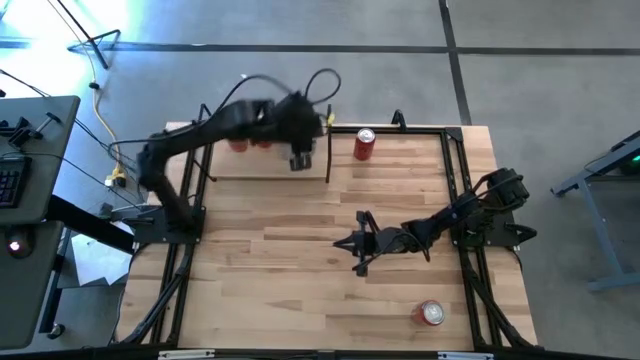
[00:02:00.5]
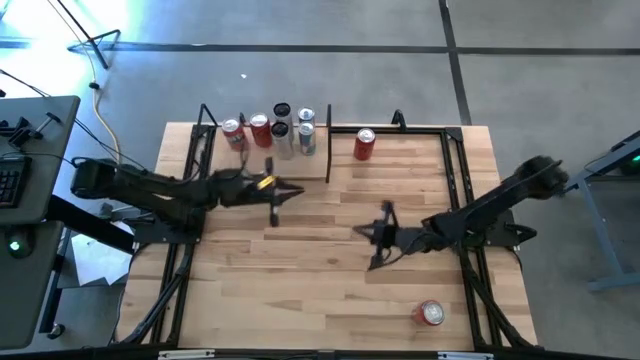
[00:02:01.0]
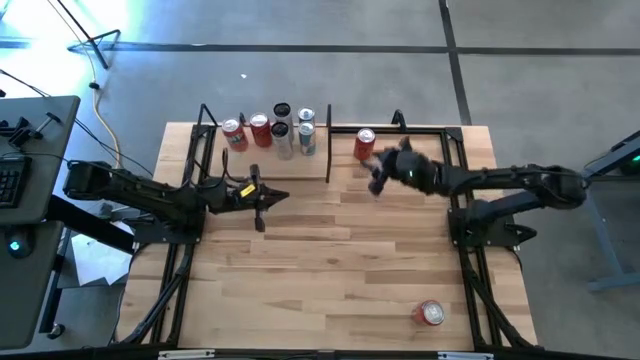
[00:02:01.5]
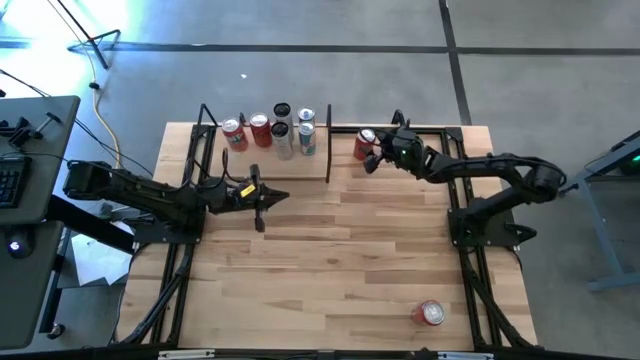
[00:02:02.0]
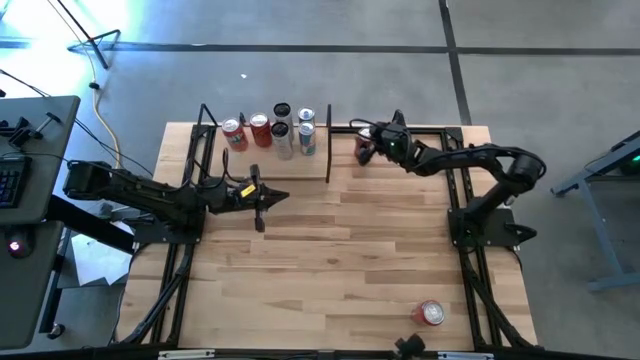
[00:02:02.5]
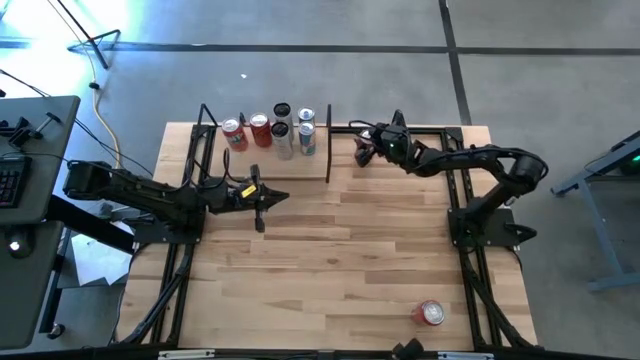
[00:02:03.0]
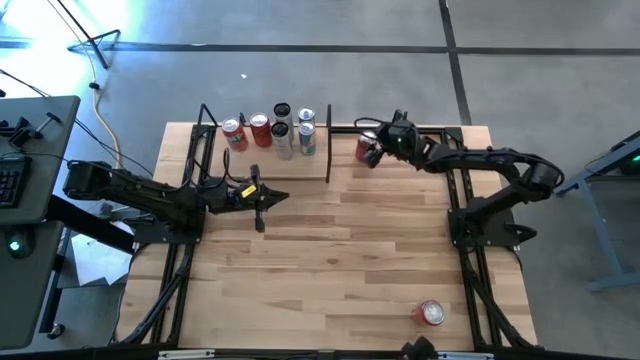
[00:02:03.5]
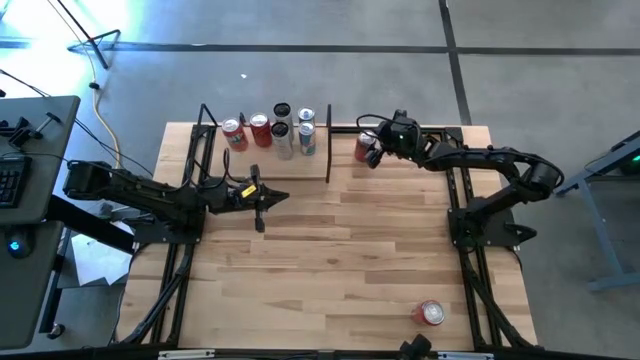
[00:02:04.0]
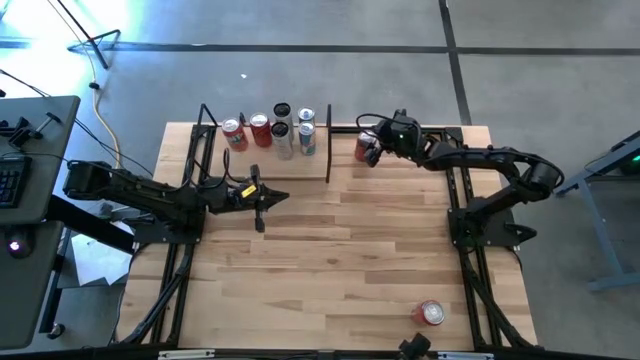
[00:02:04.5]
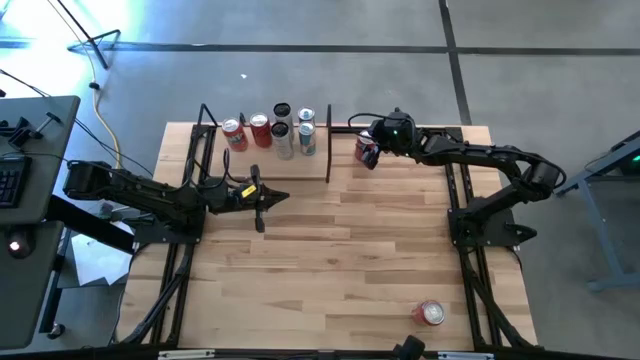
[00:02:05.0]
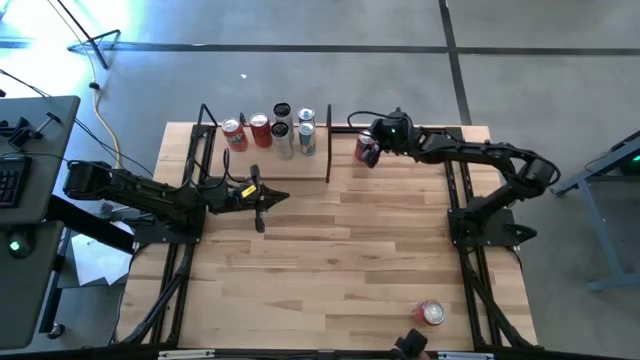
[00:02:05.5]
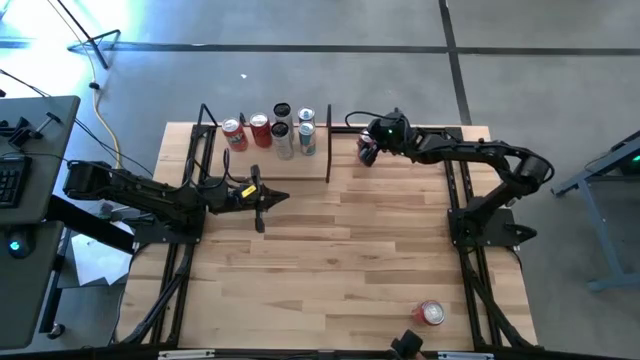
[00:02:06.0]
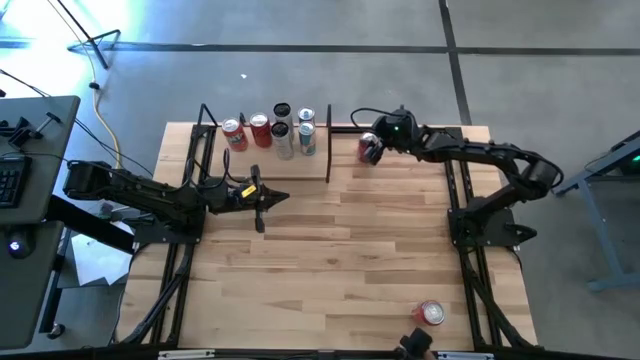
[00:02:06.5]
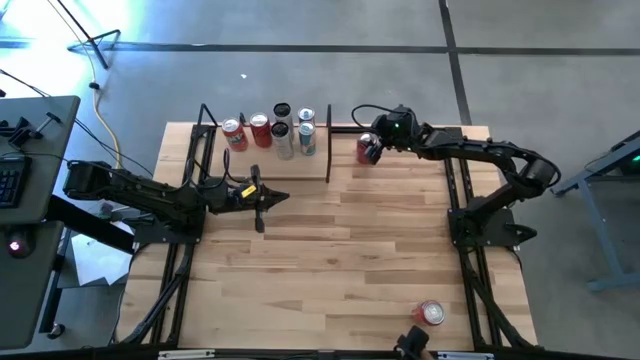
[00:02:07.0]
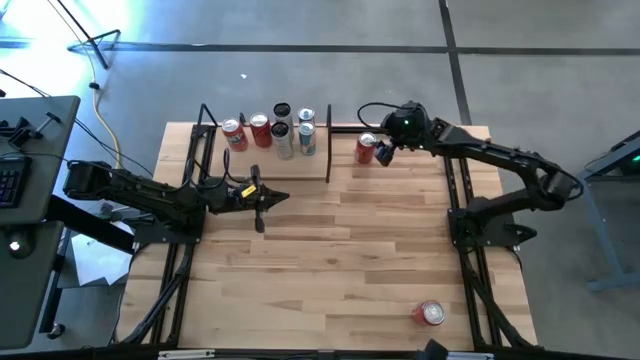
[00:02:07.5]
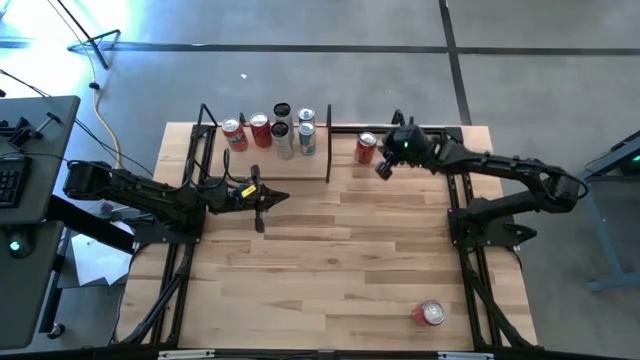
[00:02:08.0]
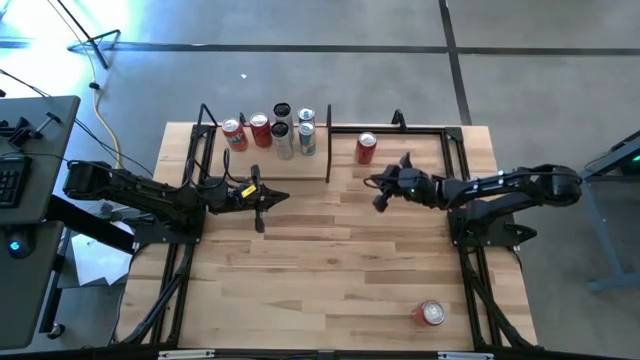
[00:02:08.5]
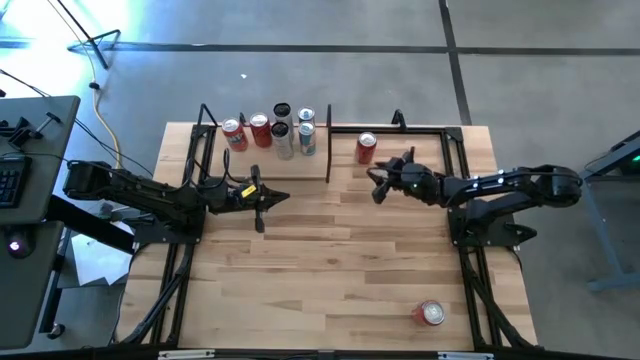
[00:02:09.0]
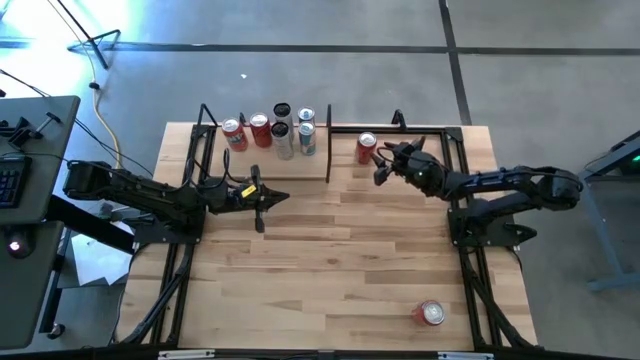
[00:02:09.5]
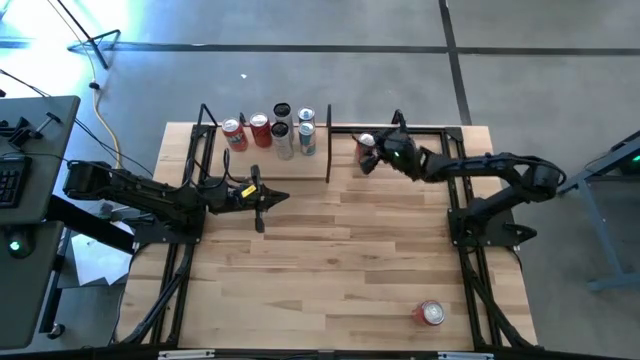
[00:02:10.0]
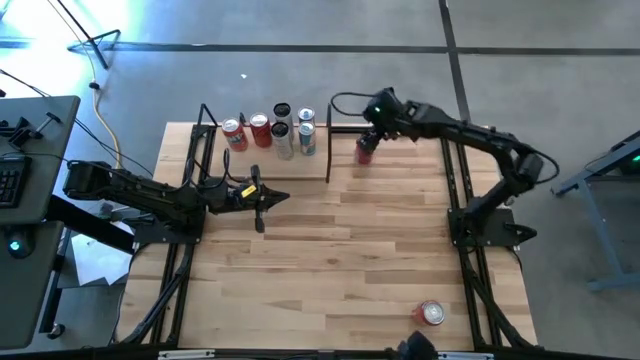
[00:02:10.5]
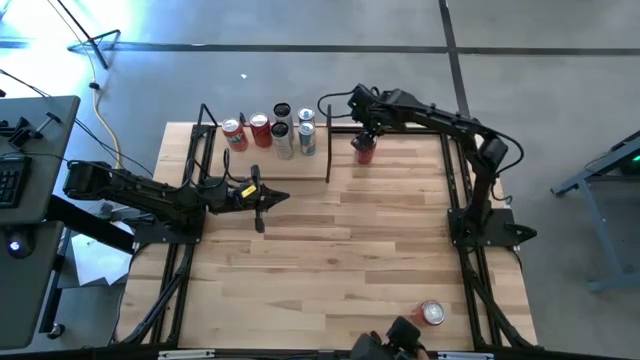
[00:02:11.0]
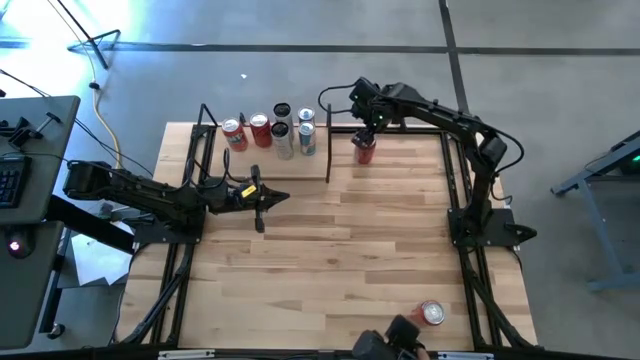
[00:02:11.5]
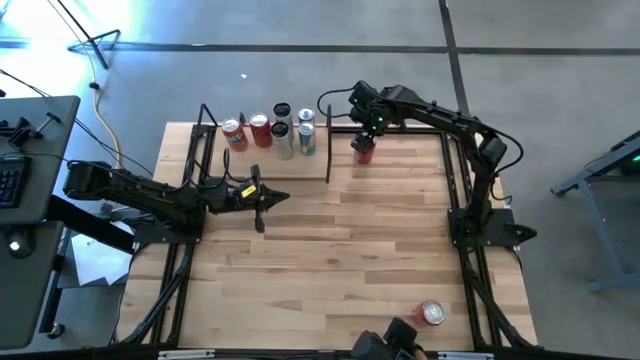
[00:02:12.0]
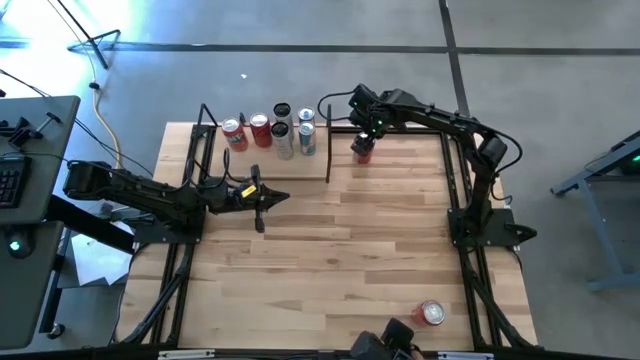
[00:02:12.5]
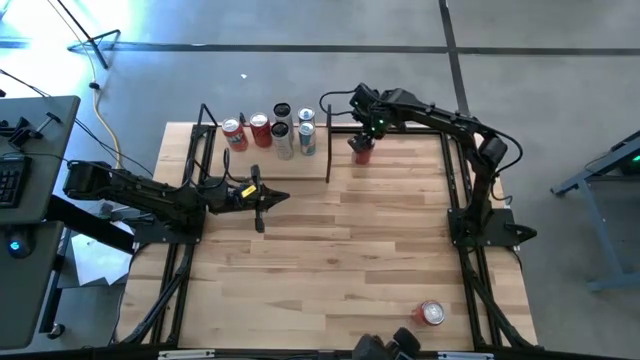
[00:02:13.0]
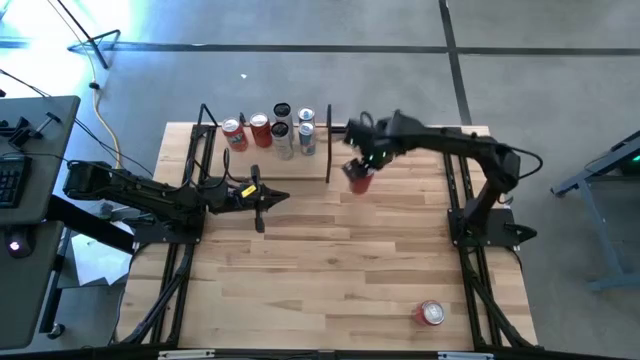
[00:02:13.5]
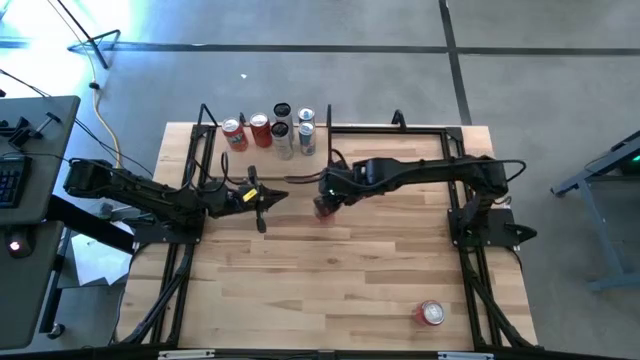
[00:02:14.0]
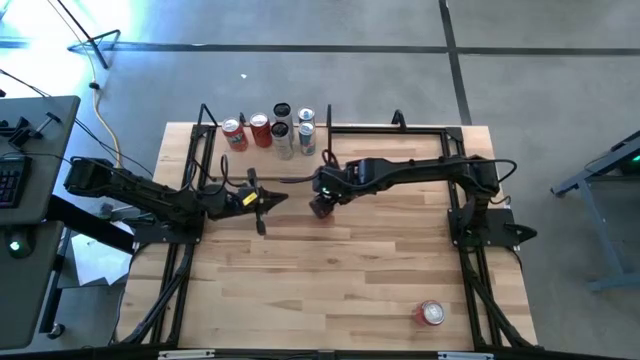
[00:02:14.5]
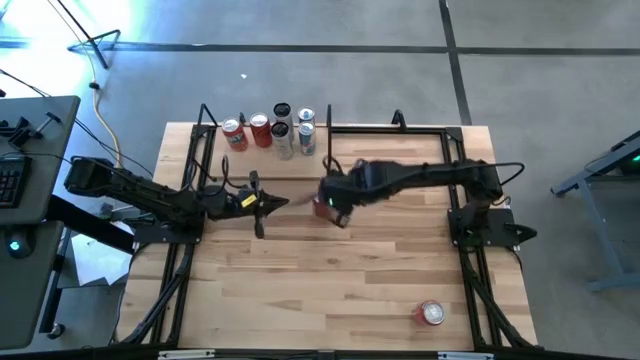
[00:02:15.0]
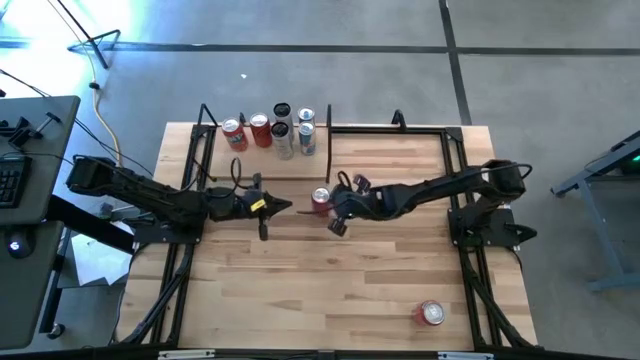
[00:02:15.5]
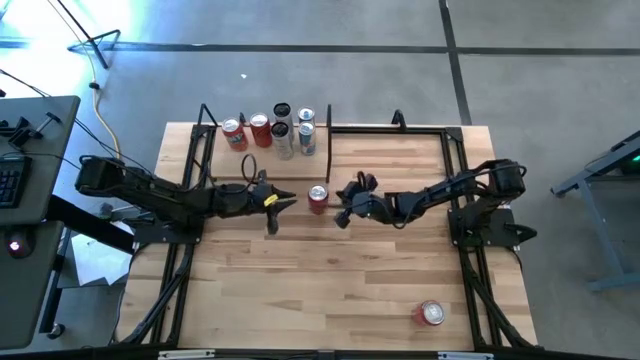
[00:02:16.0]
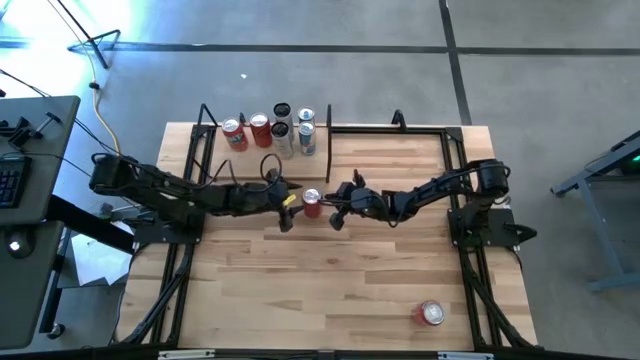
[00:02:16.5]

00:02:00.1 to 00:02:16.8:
Task: Place canned beverage on shelf
Put the red-black soda can on the shelf aligned with the other red-black soda can

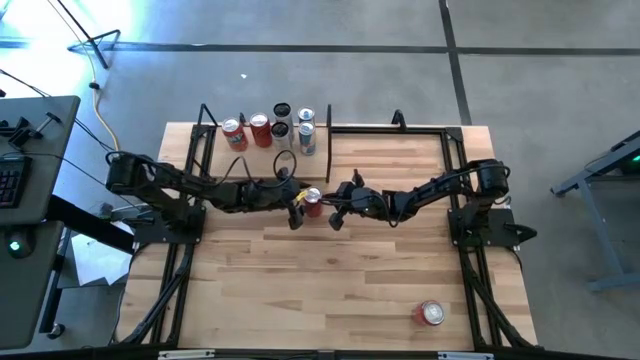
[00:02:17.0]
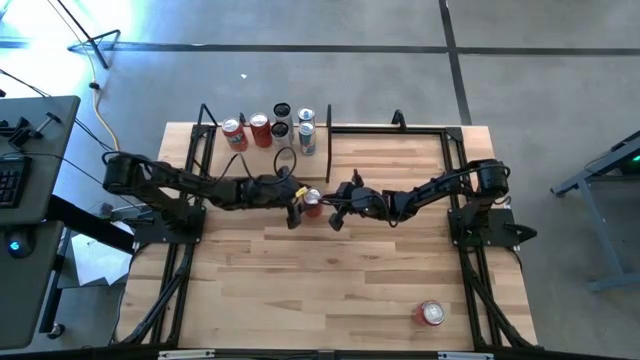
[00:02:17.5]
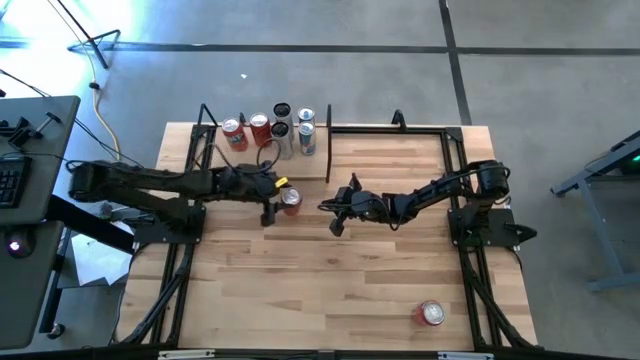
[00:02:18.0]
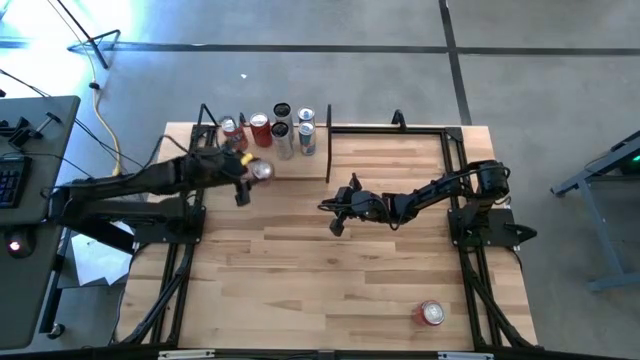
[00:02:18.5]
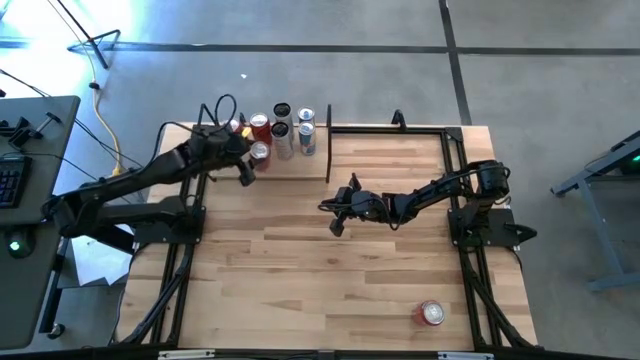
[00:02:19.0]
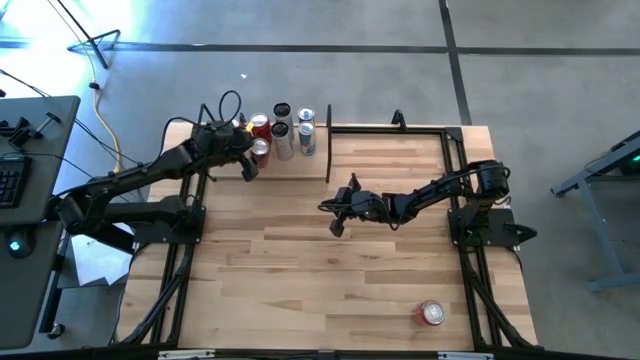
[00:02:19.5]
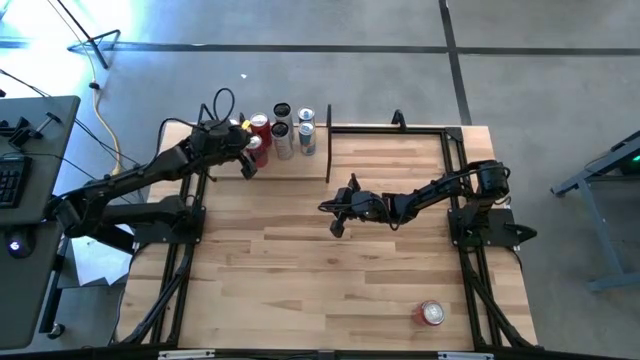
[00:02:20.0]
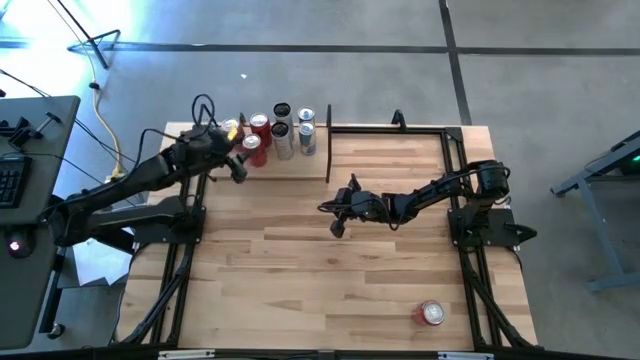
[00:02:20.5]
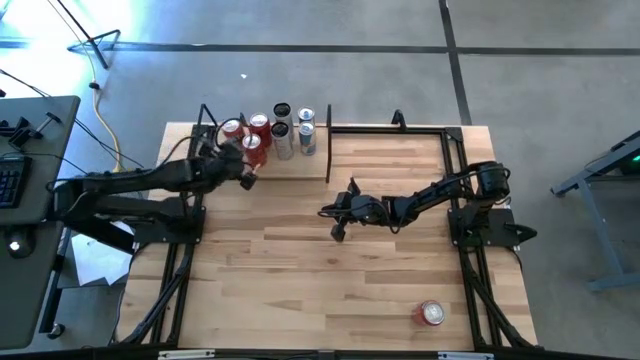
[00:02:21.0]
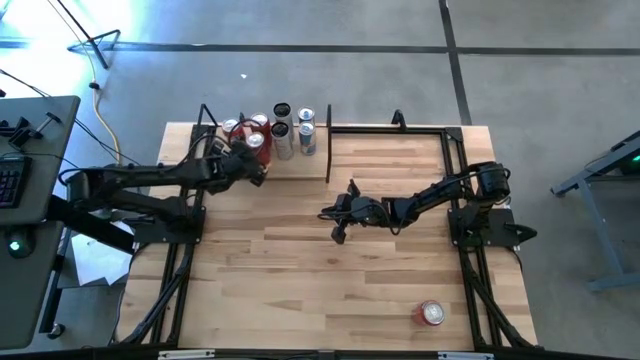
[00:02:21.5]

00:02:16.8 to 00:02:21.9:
Put the red-black soda can on the shelf aligned with the other red-black soda can
